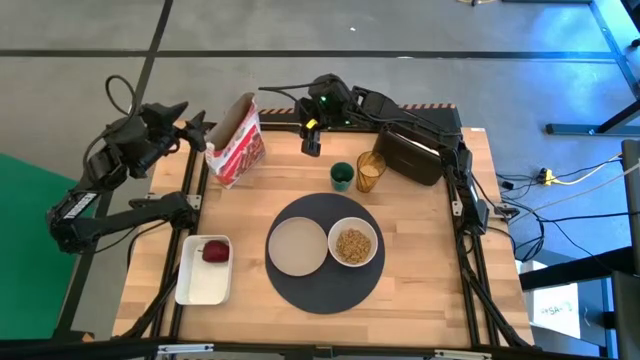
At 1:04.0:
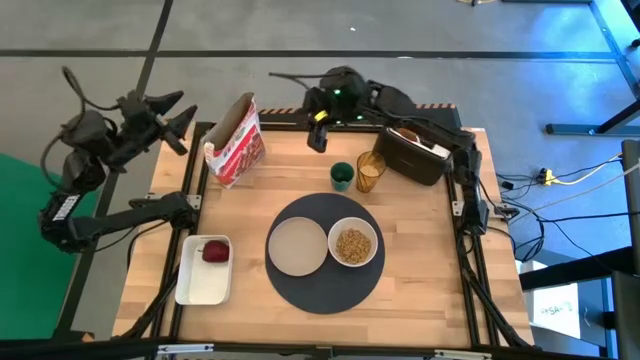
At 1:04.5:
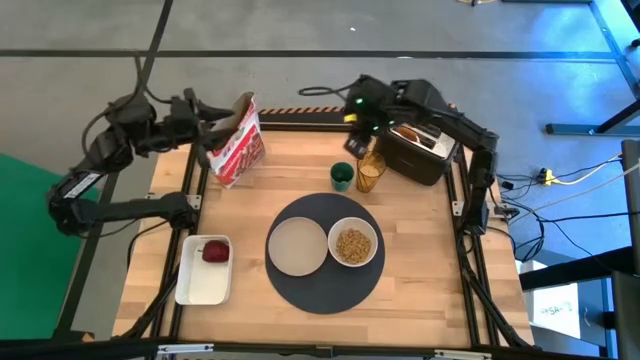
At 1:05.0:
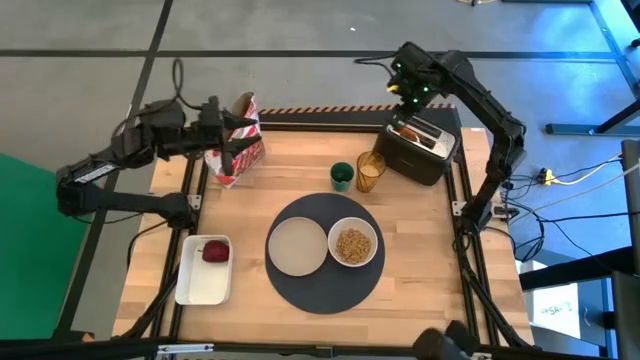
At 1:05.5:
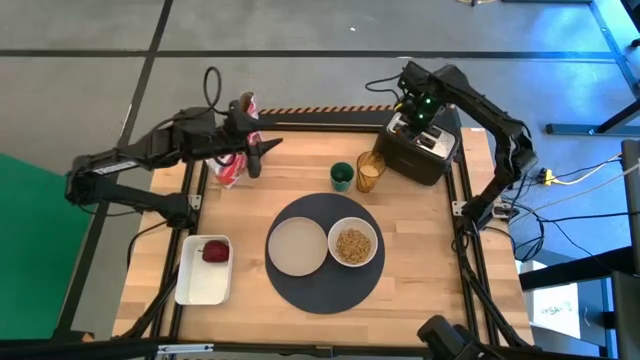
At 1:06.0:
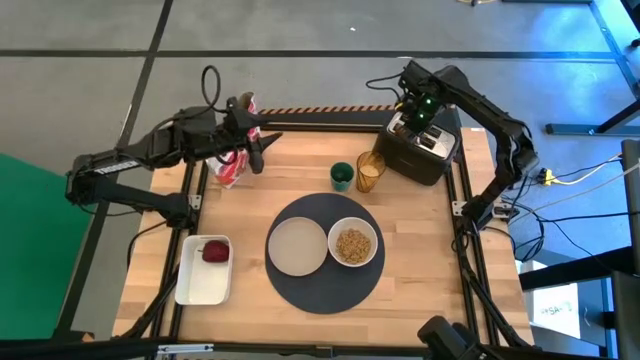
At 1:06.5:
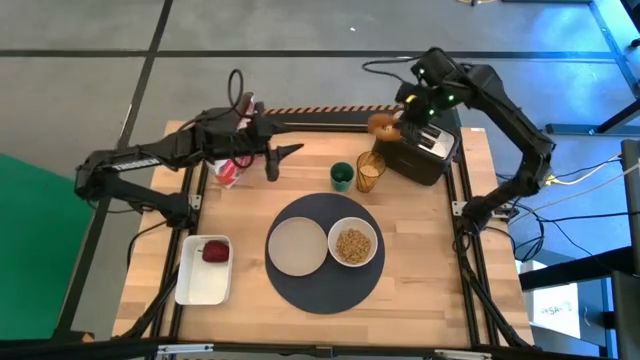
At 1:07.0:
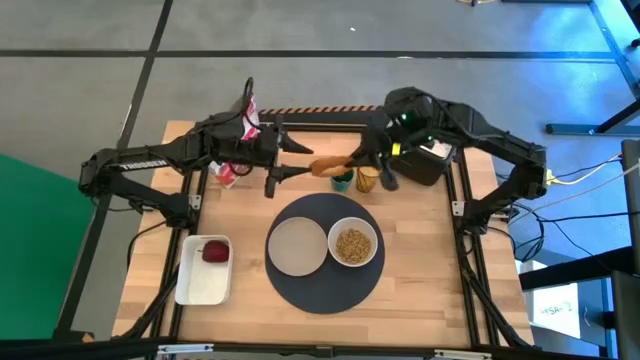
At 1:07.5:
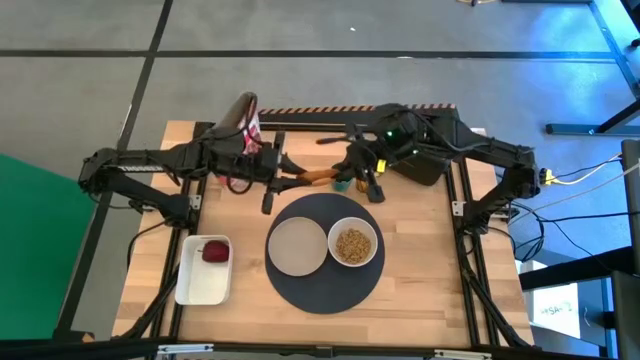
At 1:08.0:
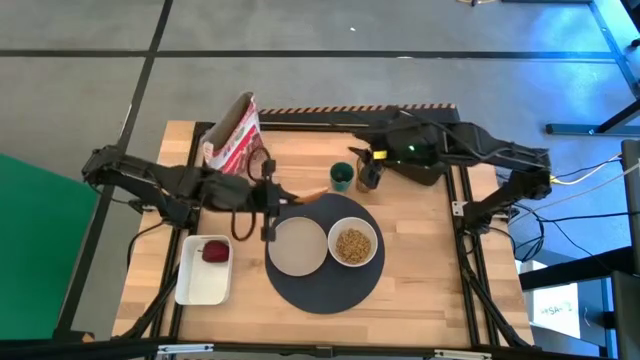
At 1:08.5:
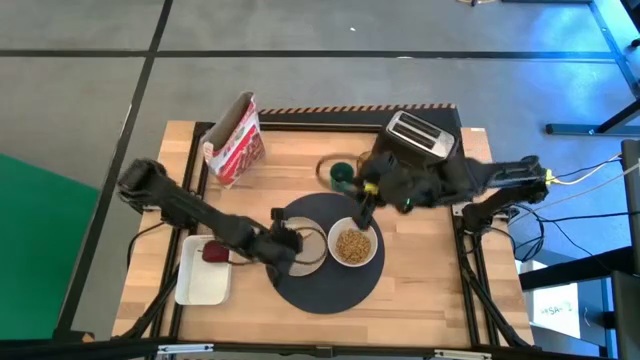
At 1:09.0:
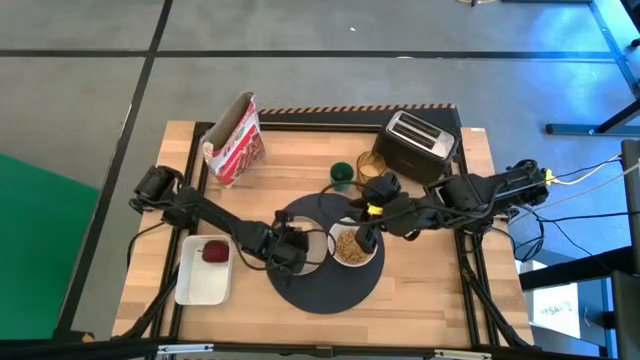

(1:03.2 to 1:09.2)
Task: Arrange a breakfast setting
Put the bagel on the light brown plate

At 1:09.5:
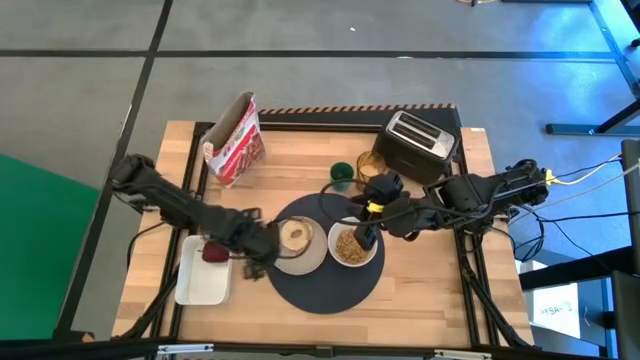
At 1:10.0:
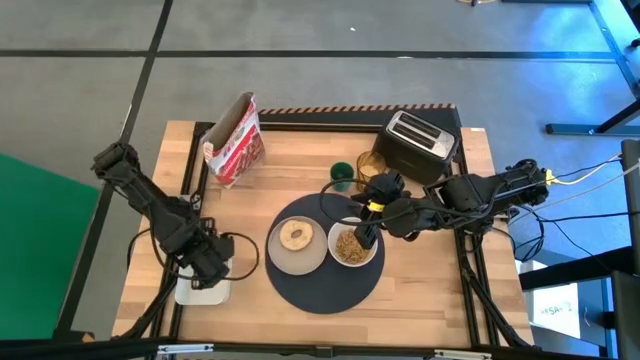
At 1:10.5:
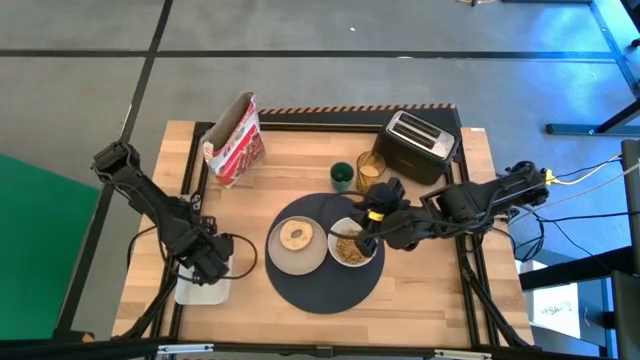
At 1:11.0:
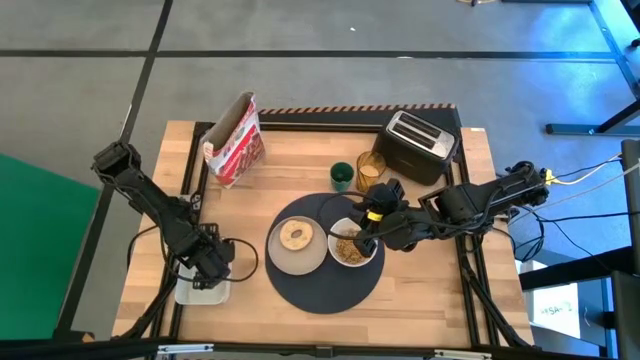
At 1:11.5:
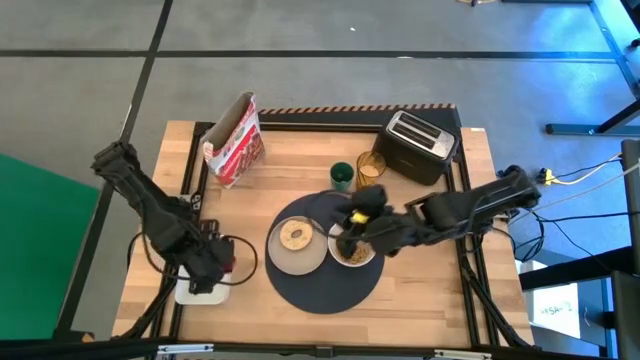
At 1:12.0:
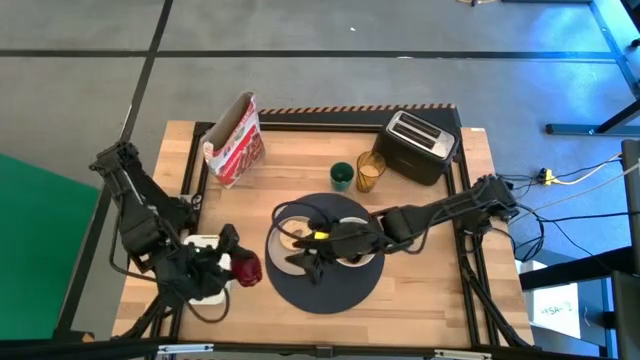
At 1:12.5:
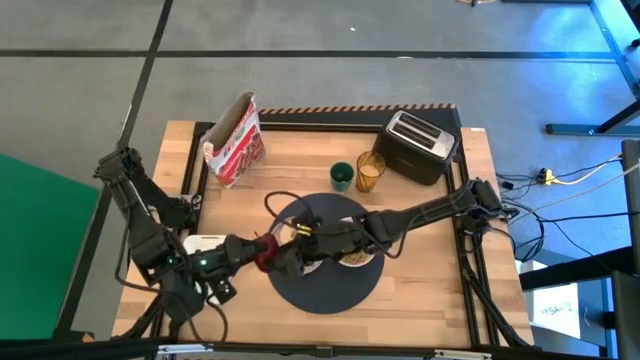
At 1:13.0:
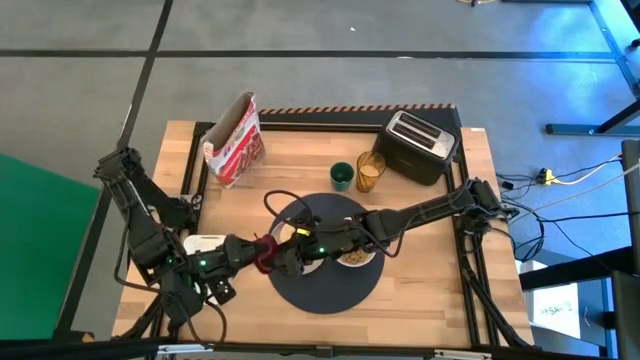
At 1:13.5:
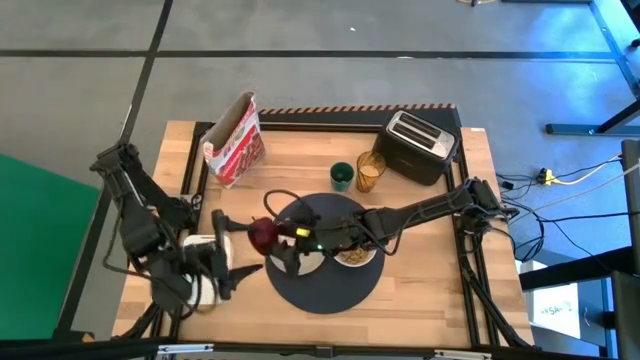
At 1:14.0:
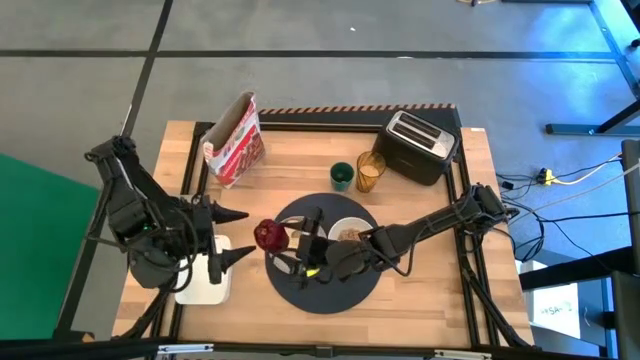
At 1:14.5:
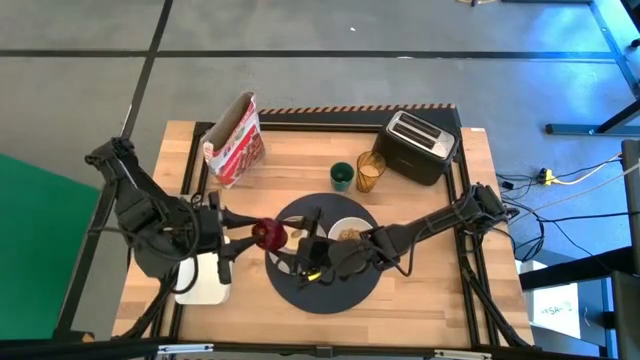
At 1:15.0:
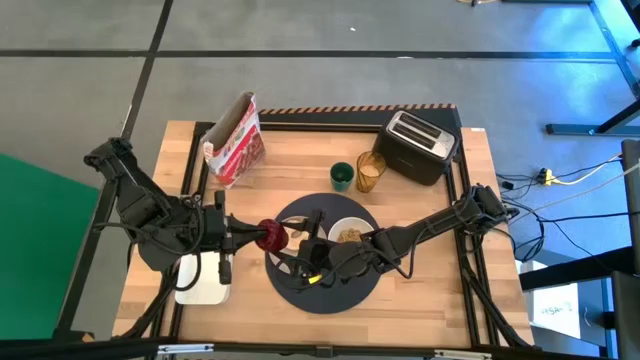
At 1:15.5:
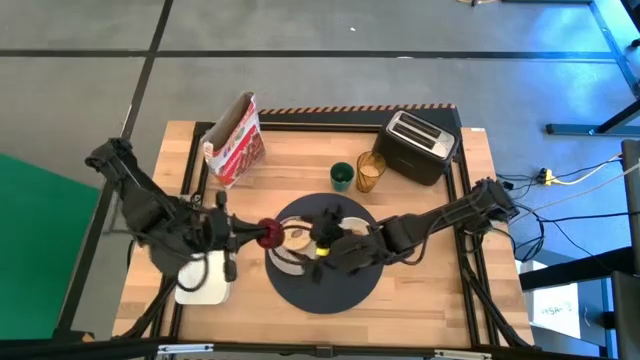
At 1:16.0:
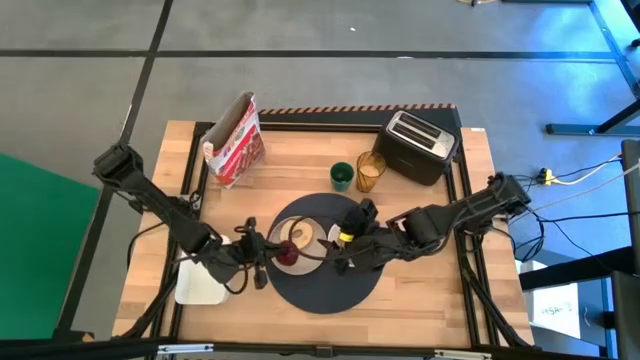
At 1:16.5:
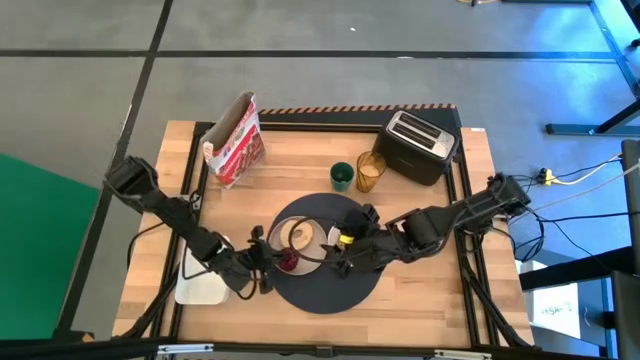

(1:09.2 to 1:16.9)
Put the red apple on the light brown plate

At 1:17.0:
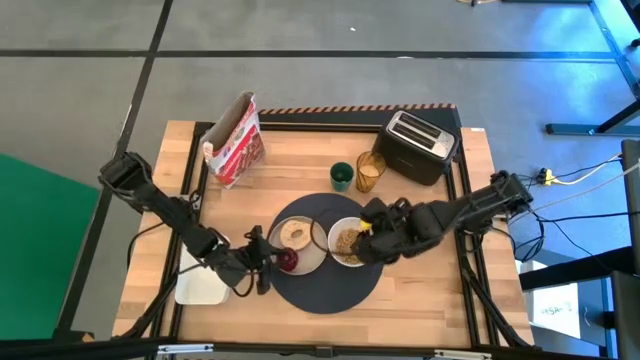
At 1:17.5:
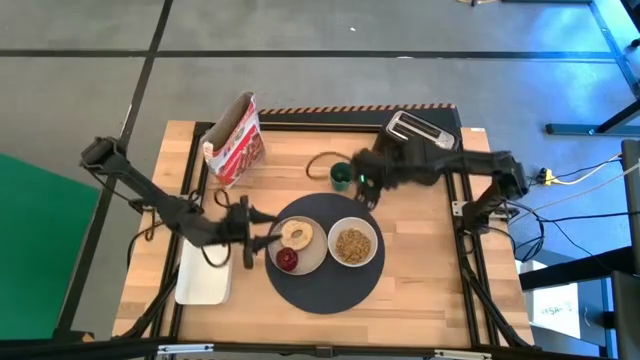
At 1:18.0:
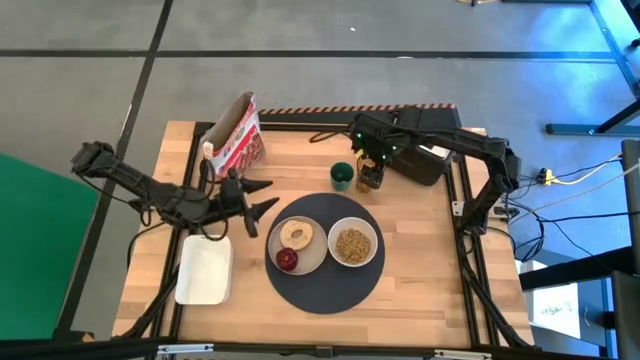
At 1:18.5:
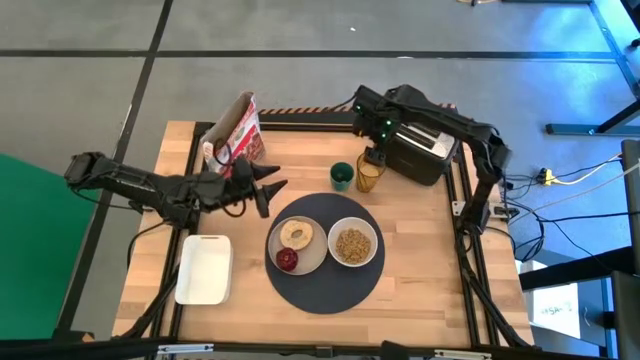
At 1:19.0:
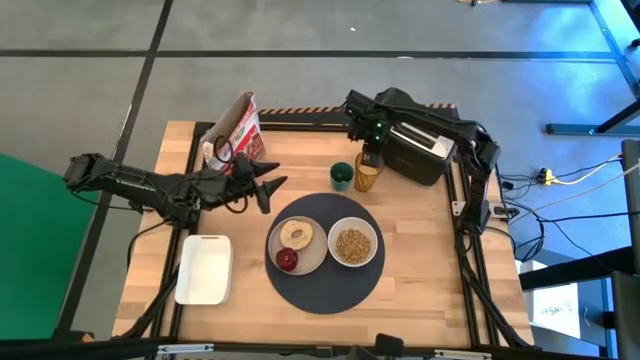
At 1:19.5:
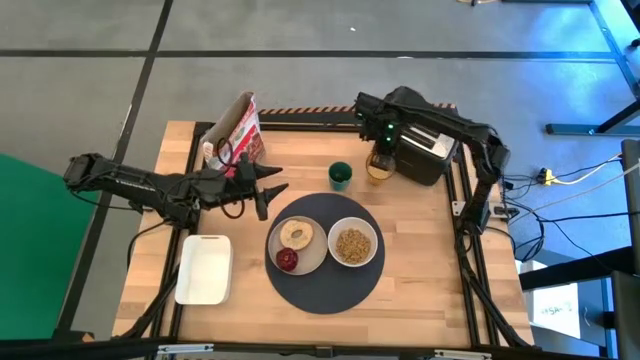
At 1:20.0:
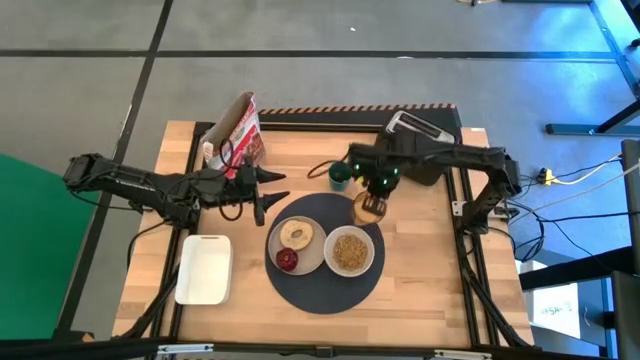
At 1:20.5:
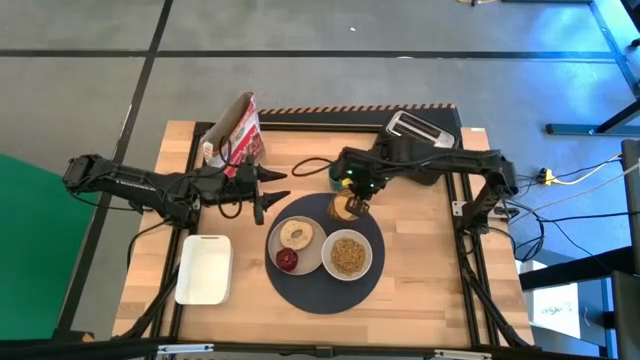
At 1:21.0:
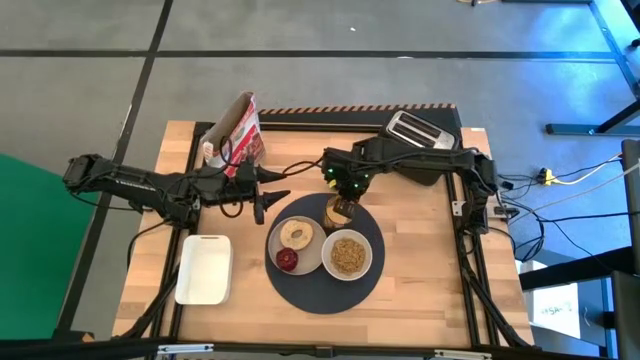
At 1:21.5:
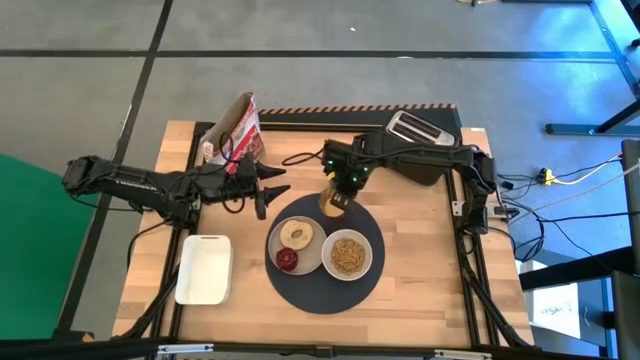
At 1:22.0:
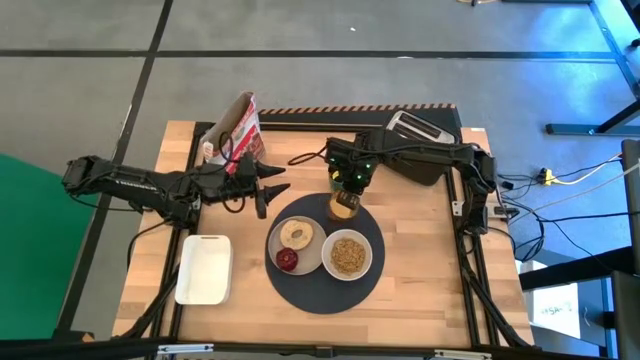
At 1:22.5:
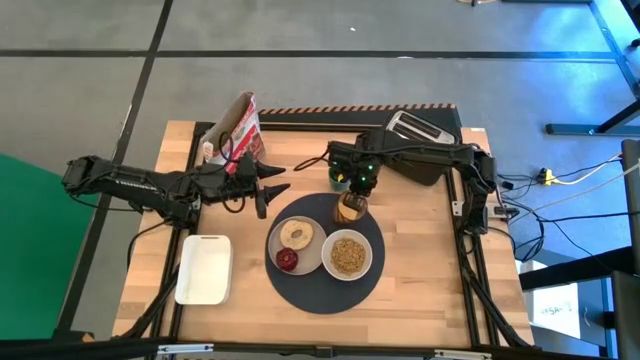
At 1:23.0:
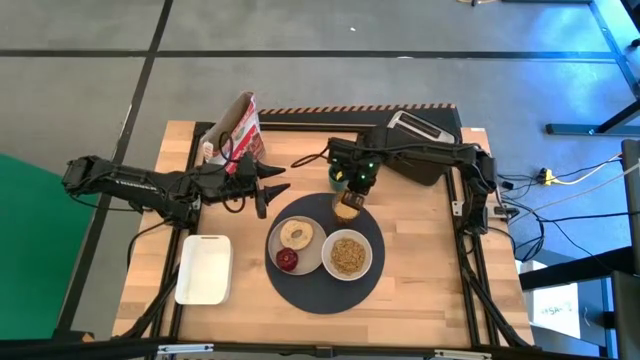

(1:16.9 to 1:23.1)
Put the yellow cup on the black mat

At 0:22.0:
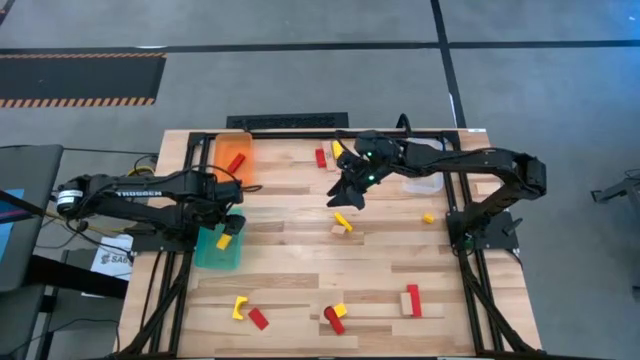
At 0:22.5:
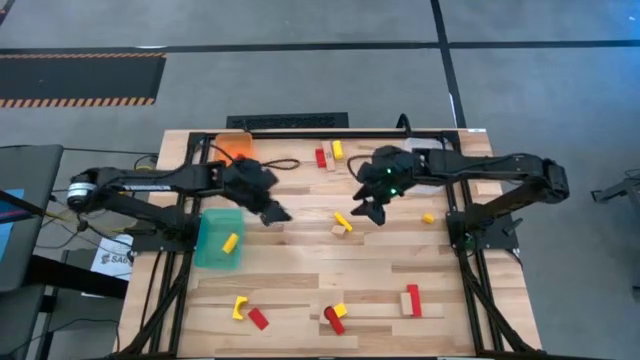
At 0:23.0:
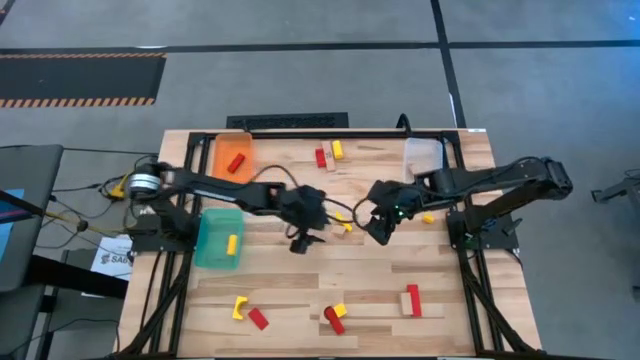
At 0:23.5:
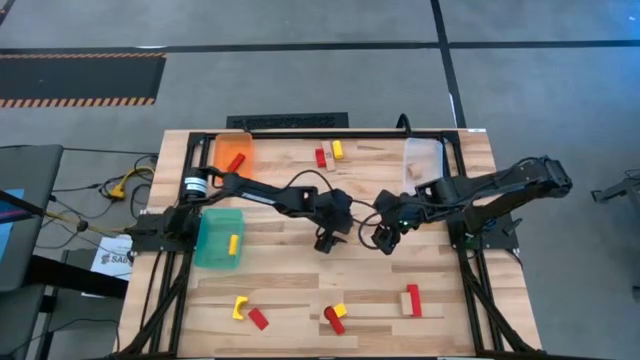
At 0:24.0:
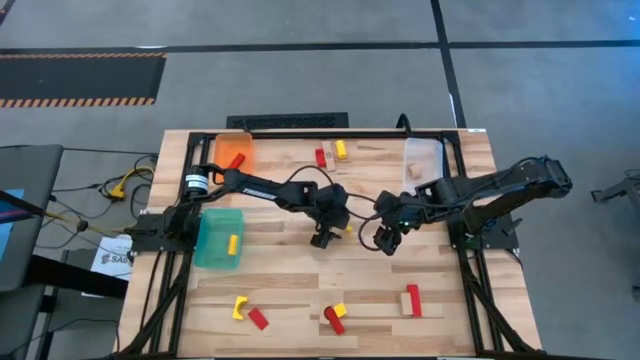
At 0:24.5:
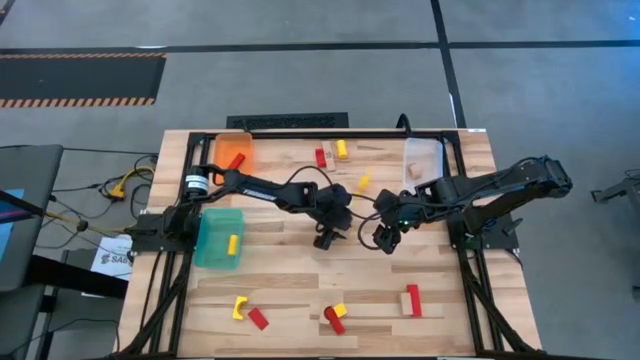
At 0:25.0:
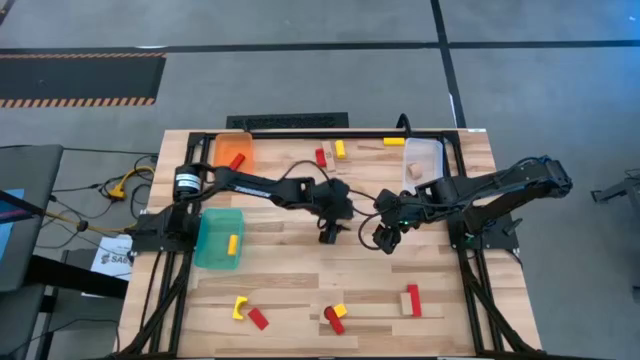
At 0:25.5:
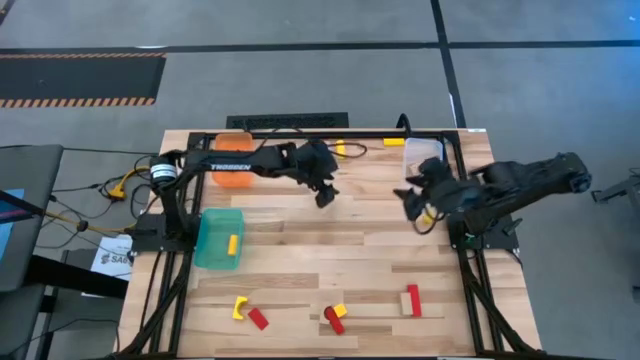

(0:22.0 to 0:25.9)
Task: Sort & place blocks by color
Put the brown wooden block into the white bin
